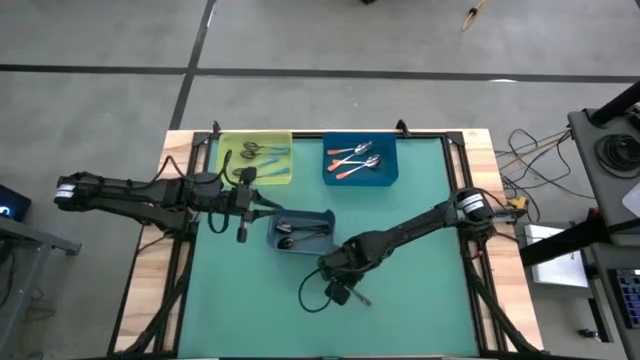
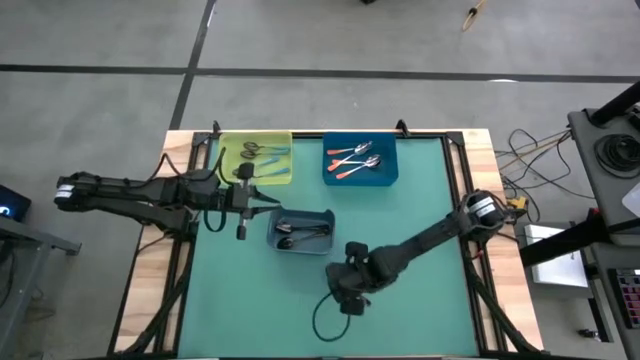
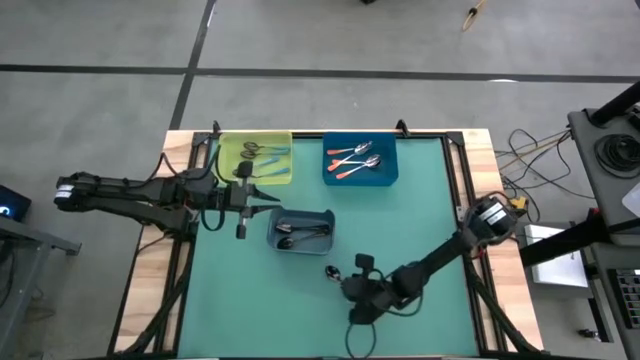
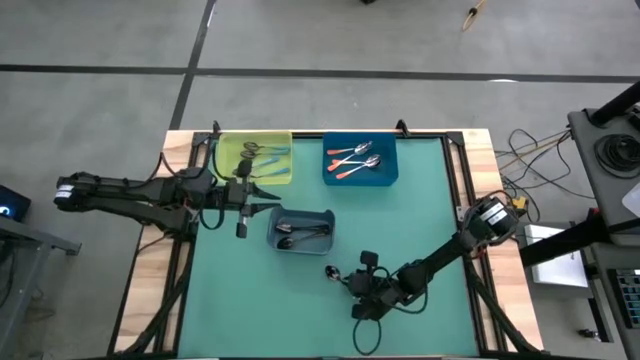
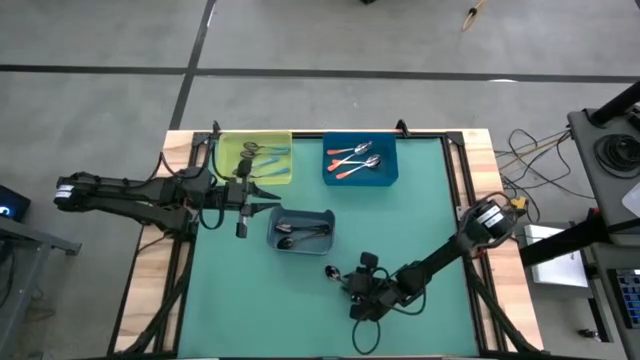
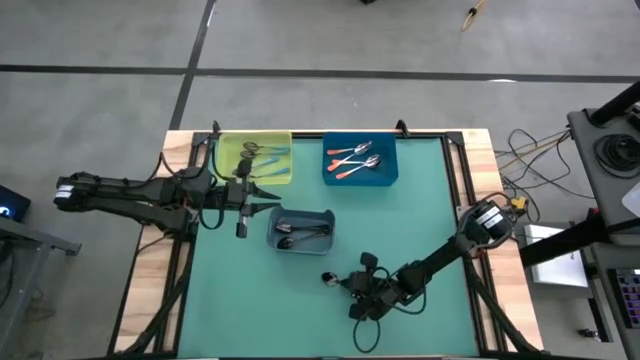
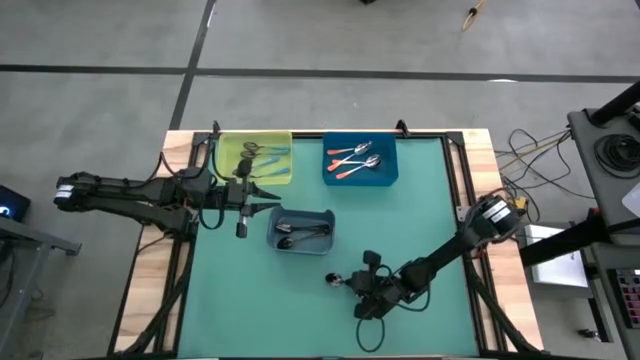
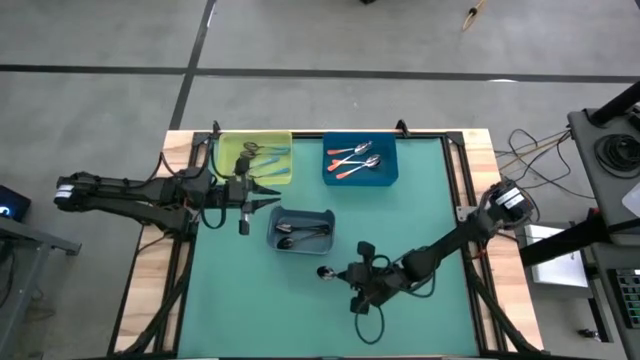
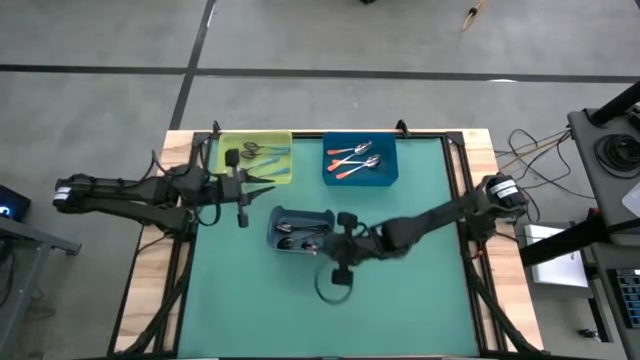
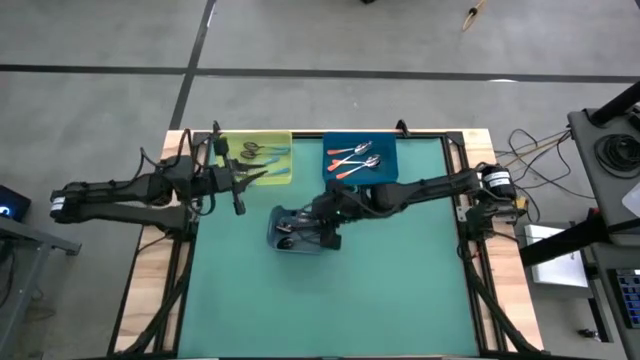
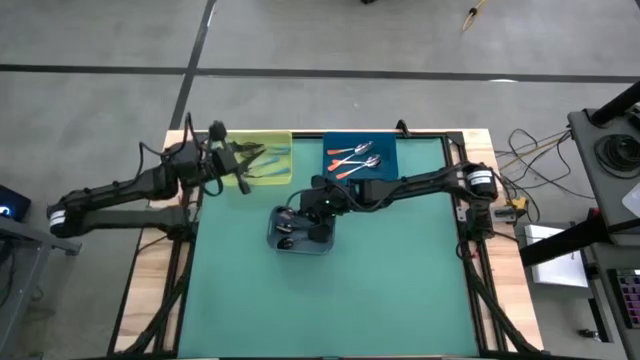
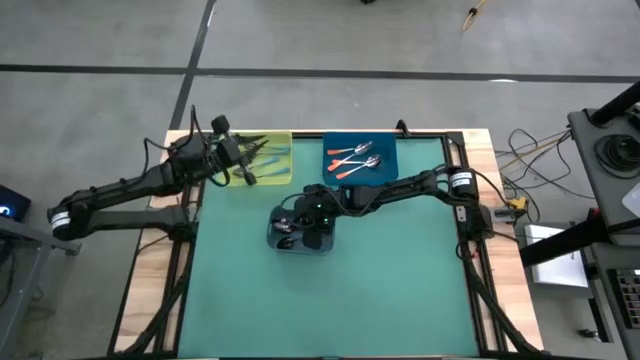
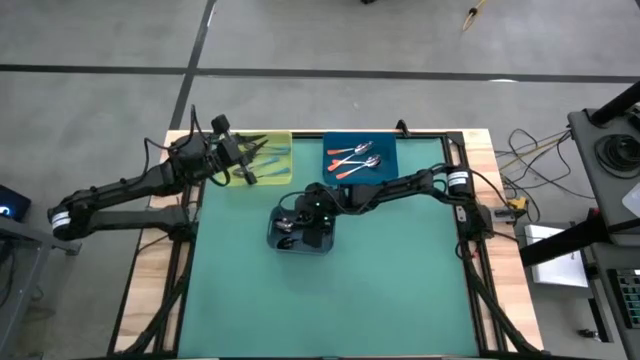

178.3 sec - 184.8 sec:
Task: Sort silverware by color (type)
Put the black spoon into the gray bin

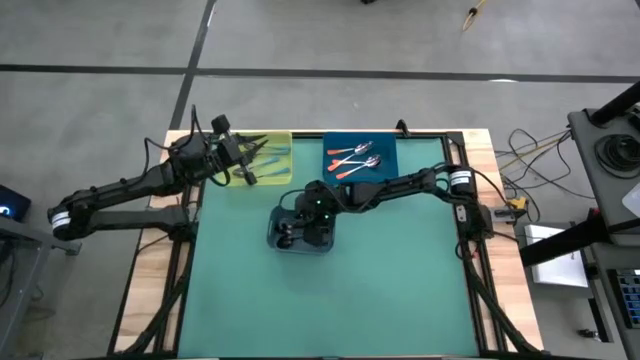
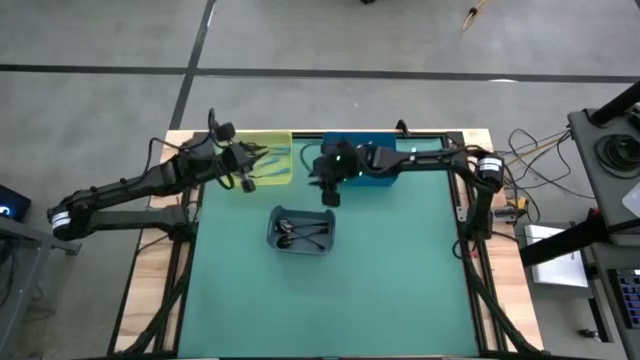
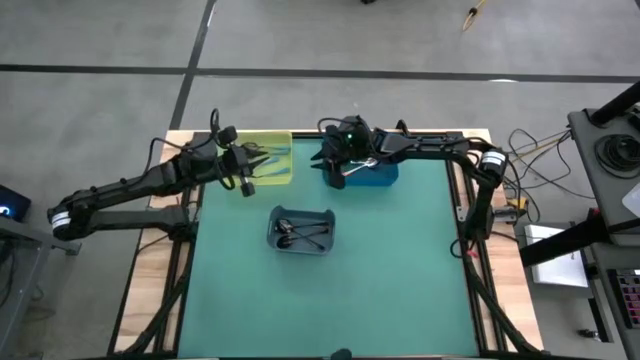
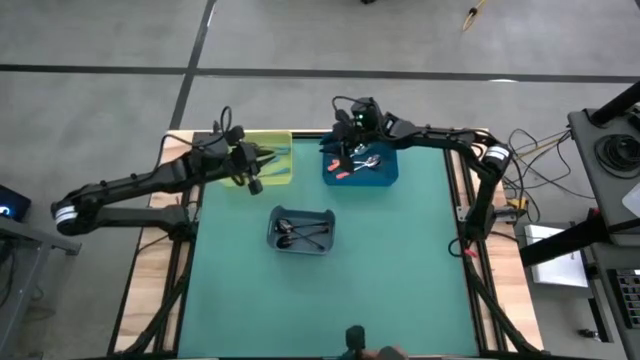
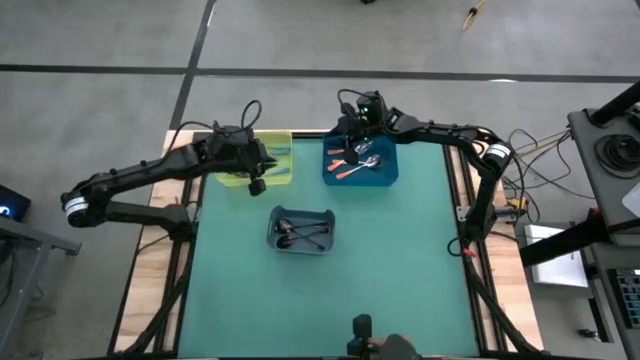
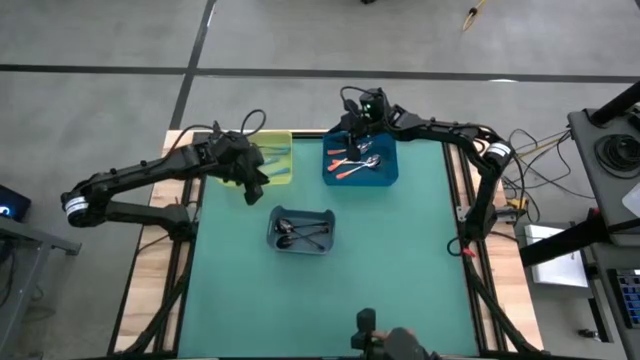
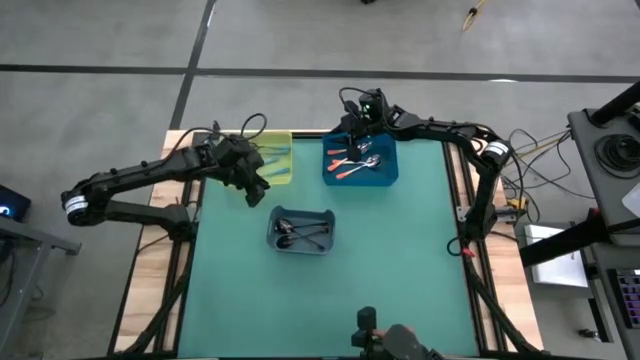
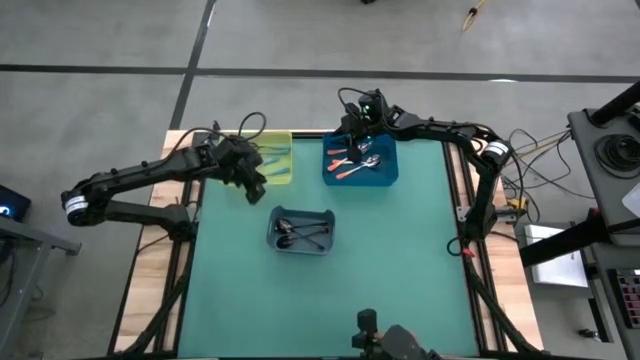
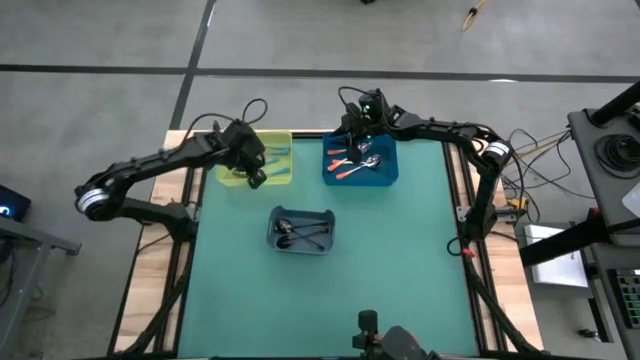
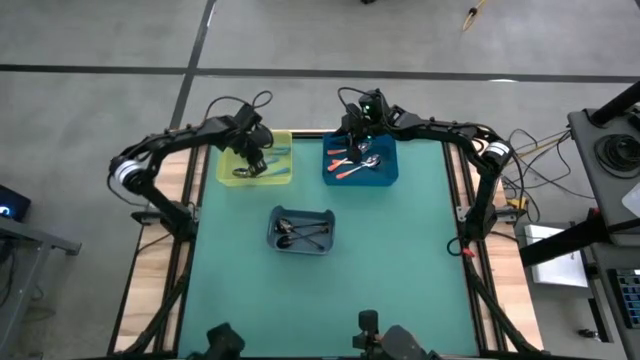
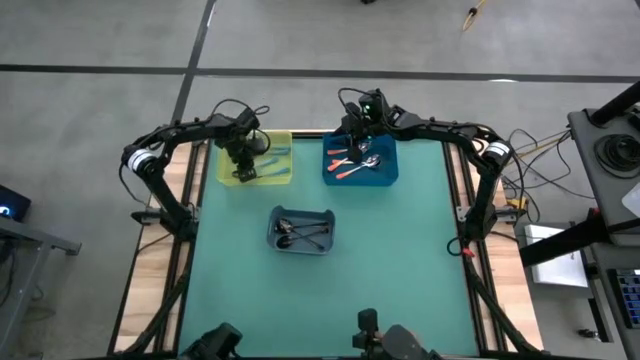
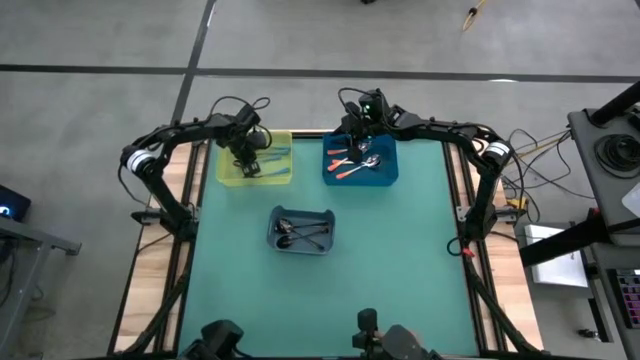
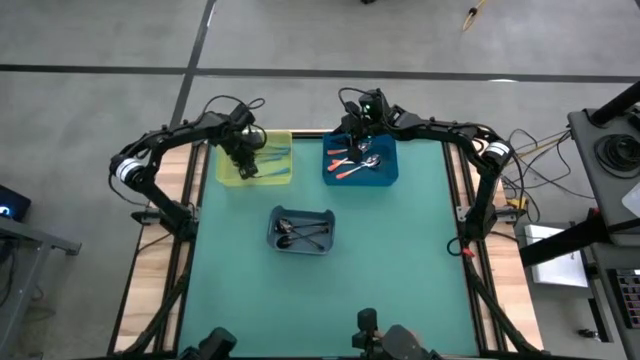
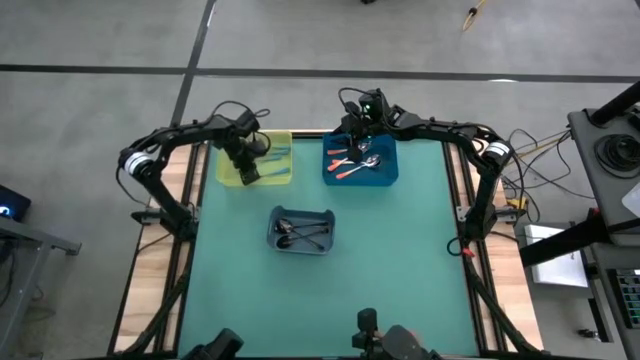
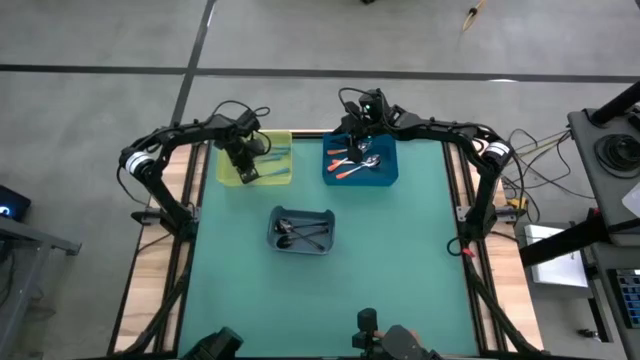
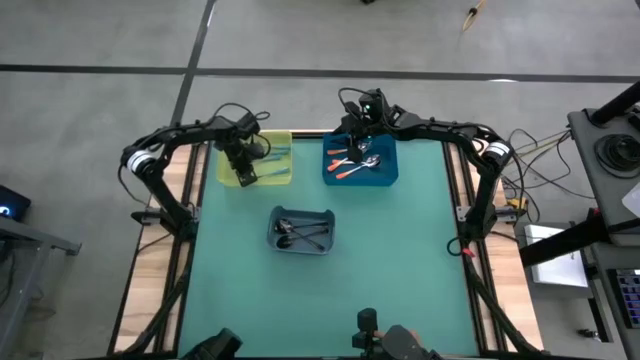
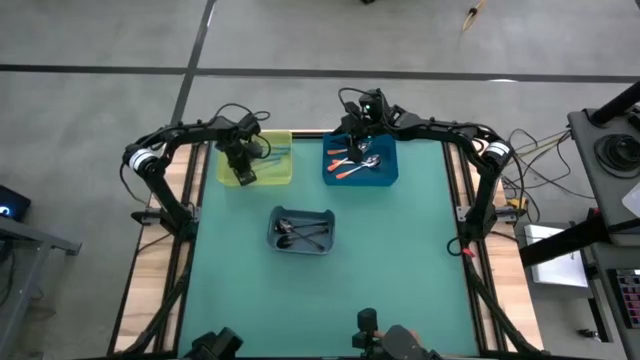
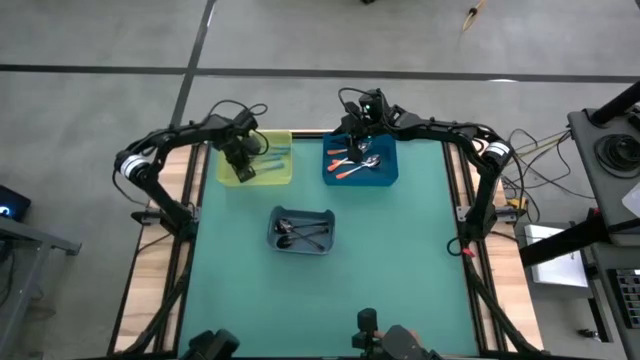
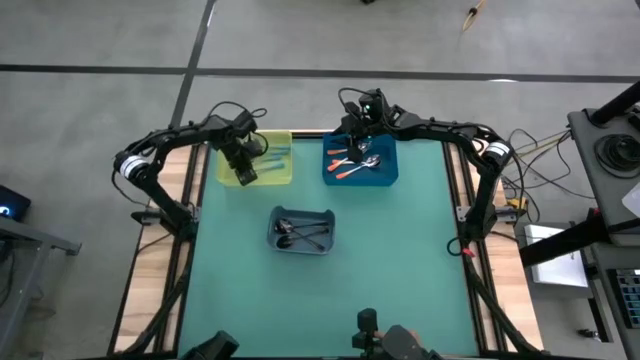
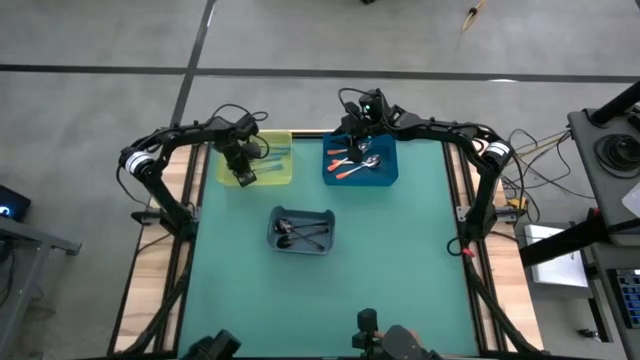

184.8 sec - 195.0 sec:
Adjust the blue spoons in the green bin

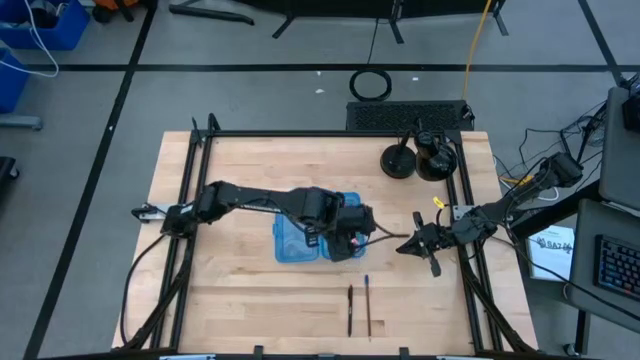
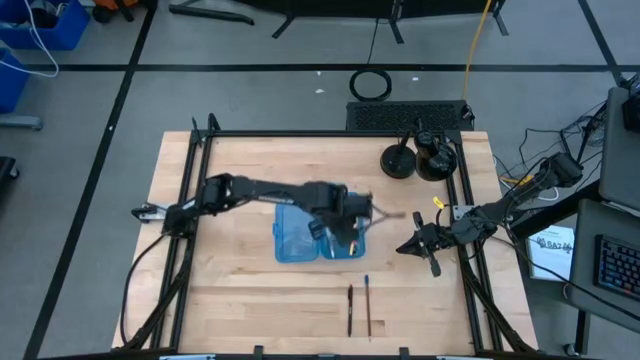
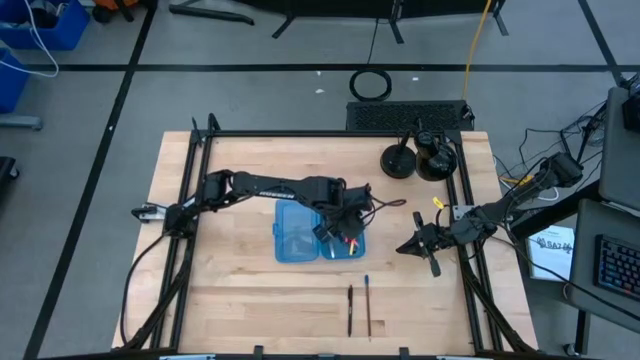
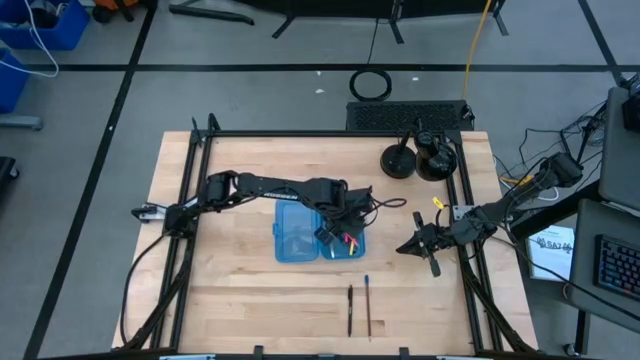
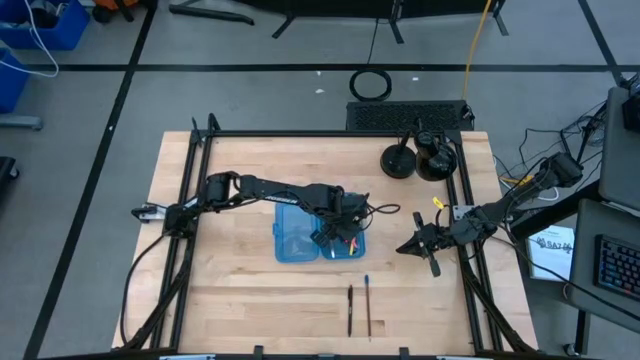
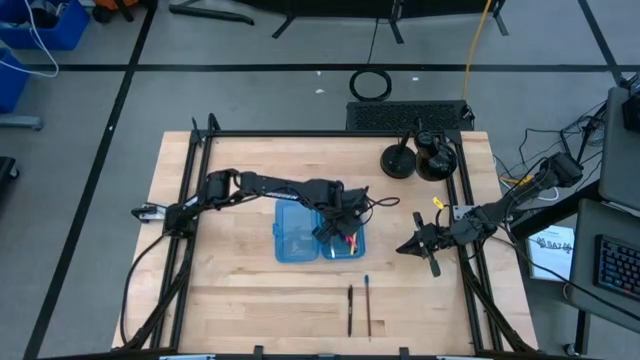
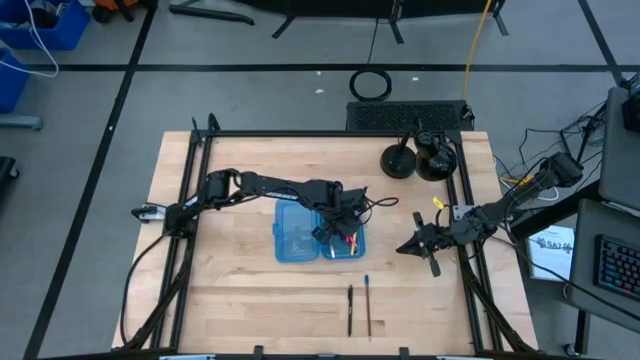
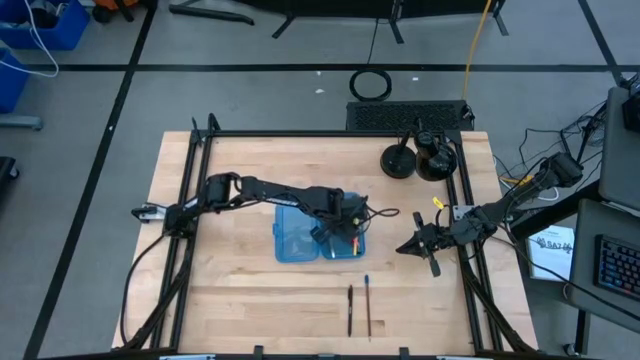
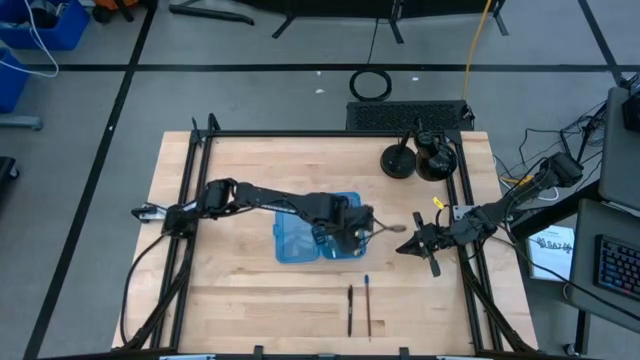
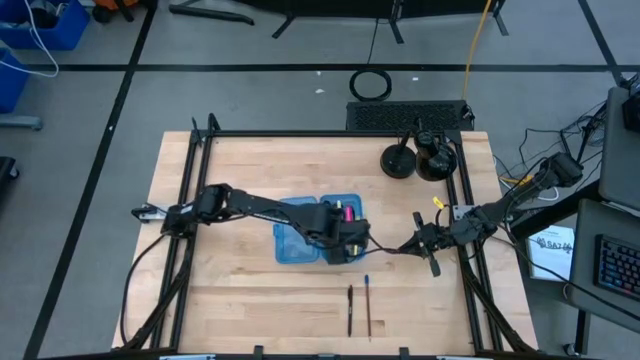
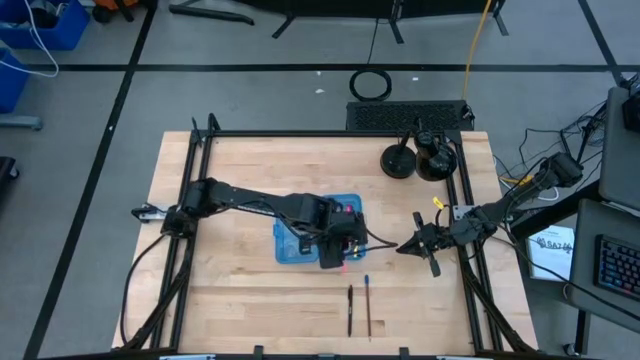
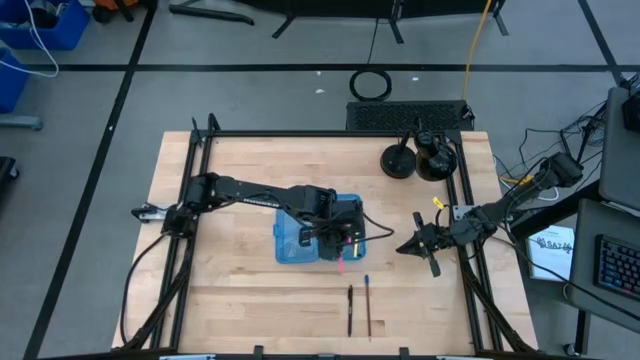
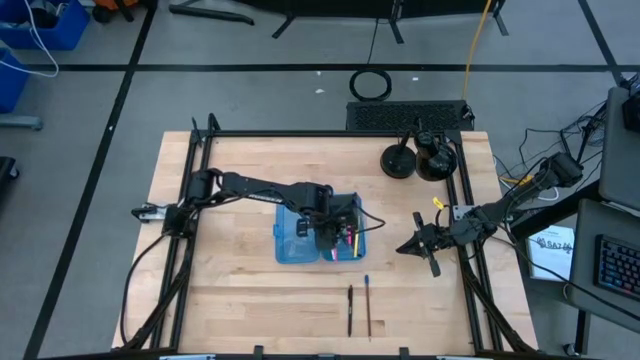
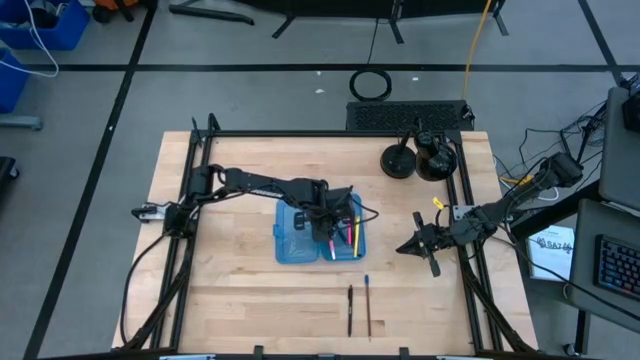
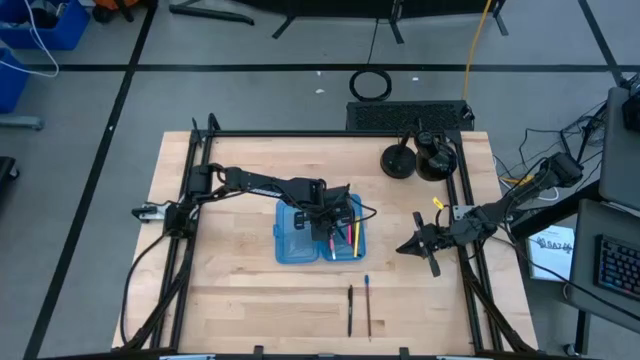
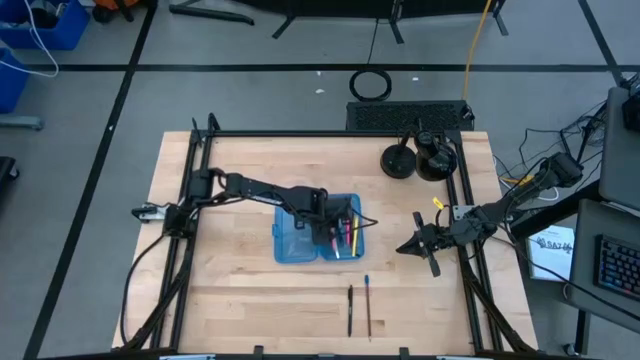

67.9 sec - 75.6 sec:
Task: Pick & place school supplies into a supply box
Adjust the pink pencil in the blue supply box
